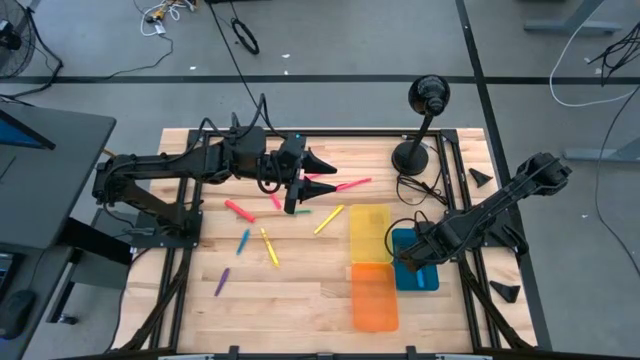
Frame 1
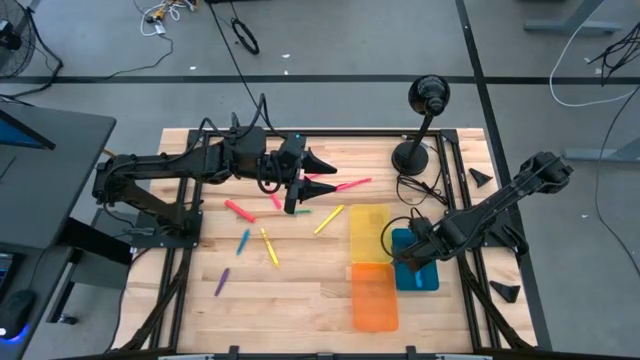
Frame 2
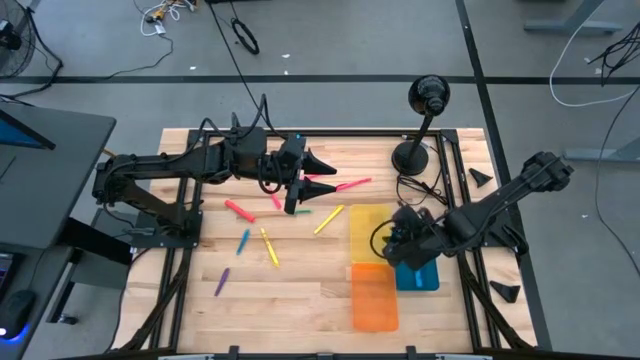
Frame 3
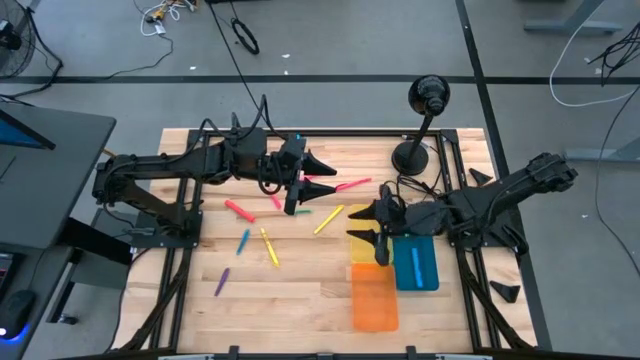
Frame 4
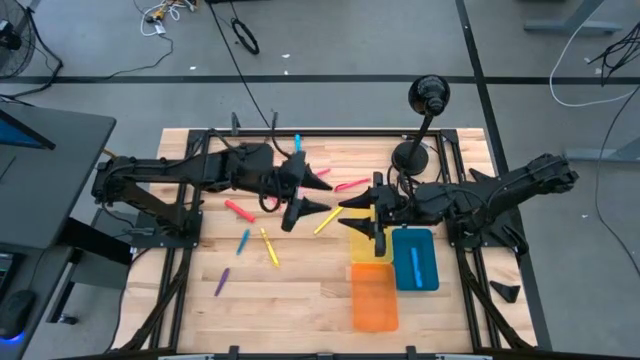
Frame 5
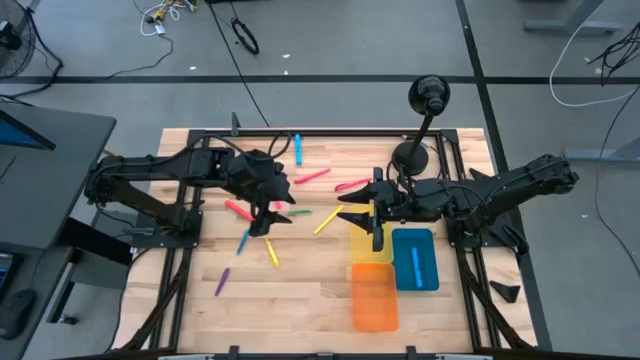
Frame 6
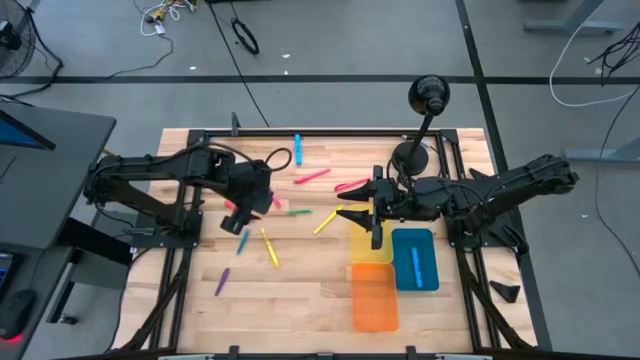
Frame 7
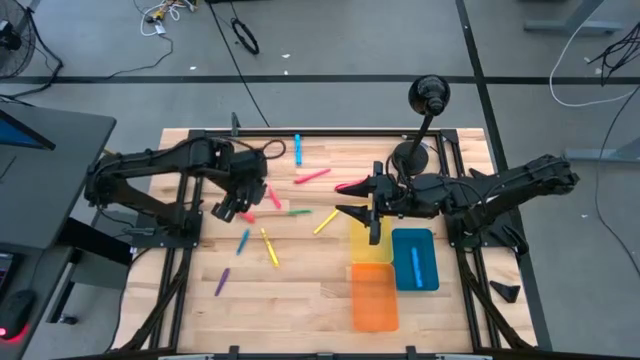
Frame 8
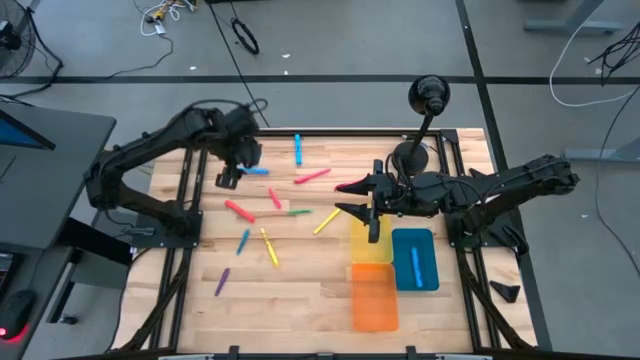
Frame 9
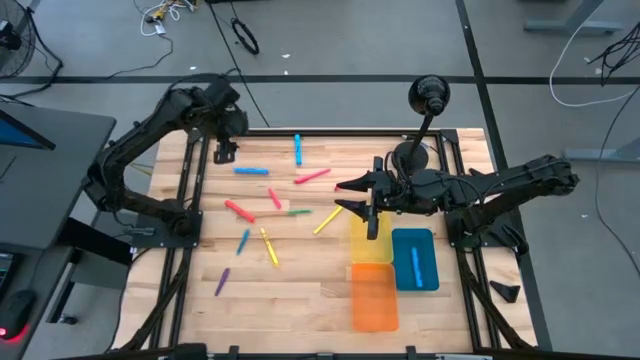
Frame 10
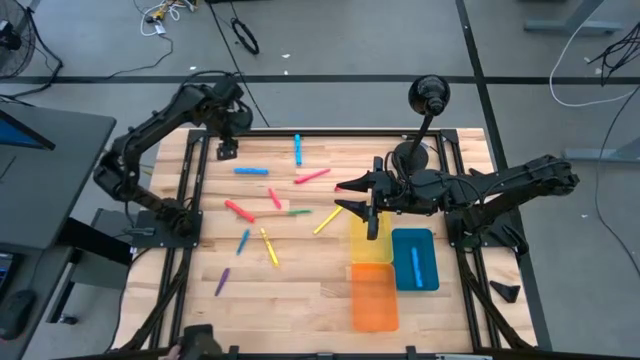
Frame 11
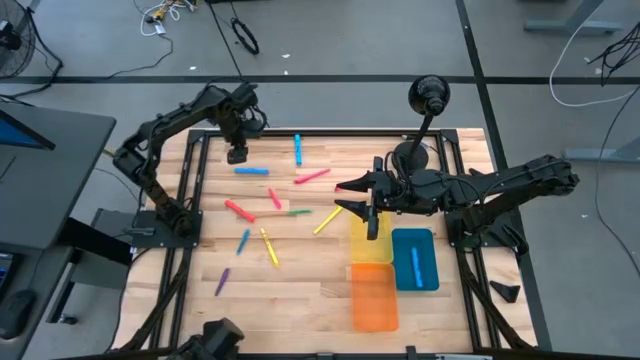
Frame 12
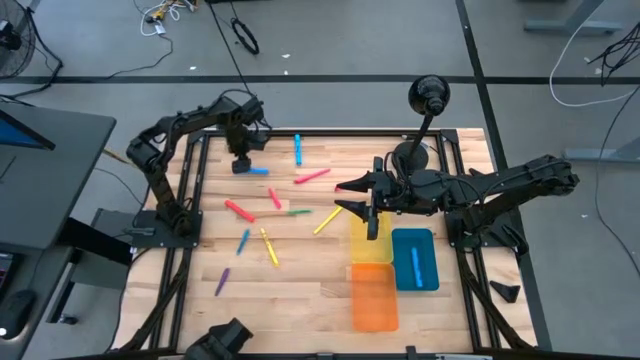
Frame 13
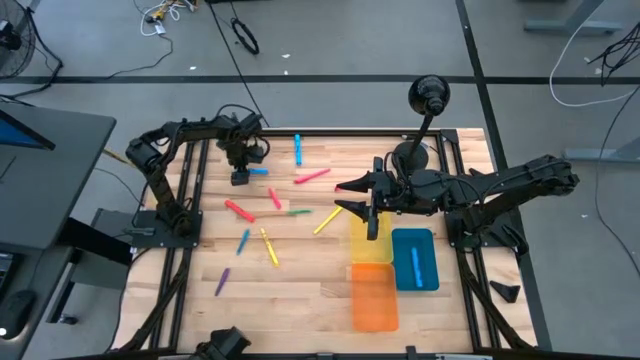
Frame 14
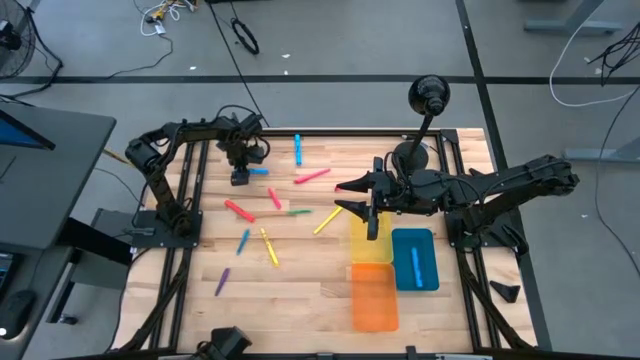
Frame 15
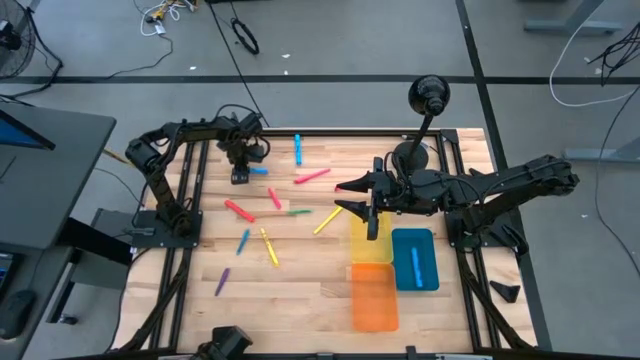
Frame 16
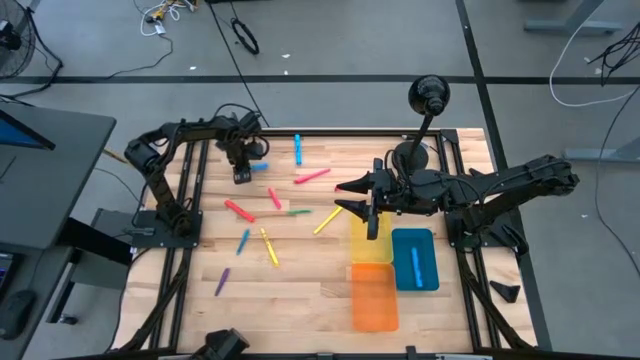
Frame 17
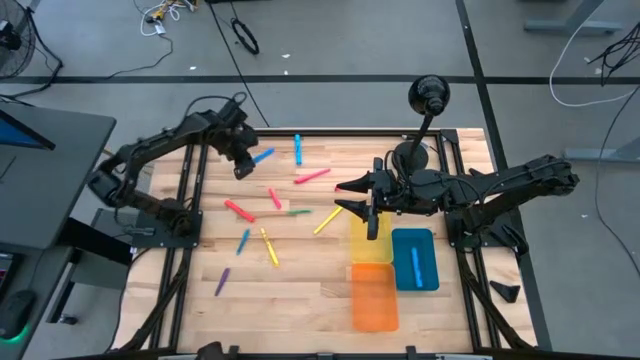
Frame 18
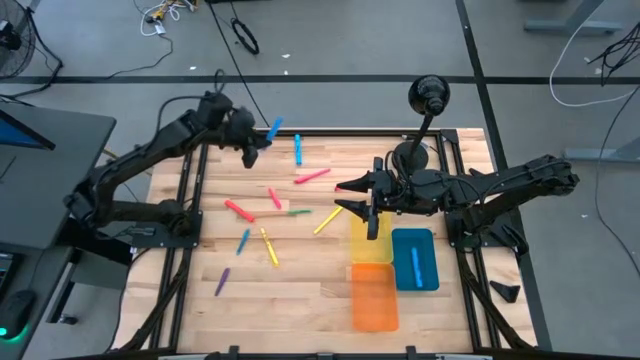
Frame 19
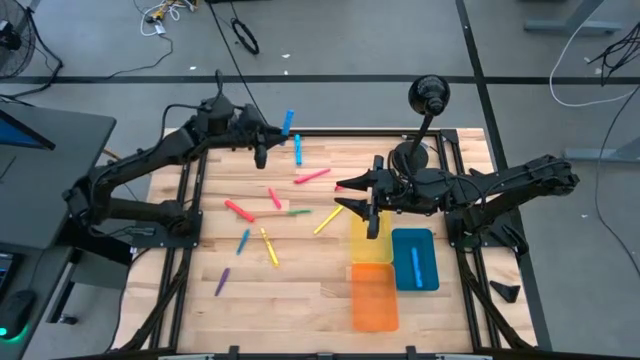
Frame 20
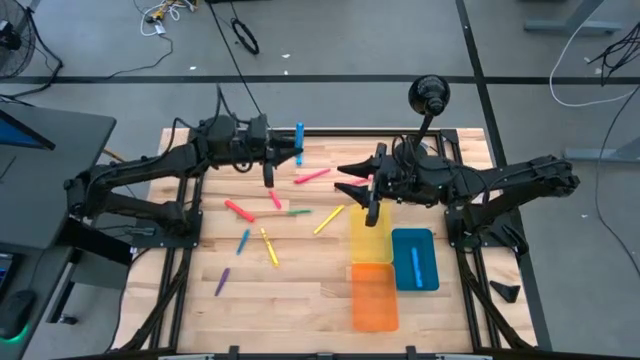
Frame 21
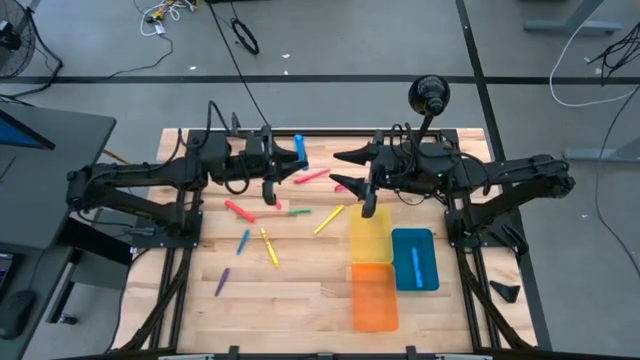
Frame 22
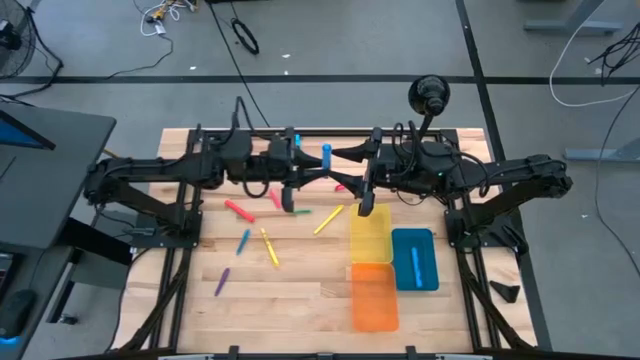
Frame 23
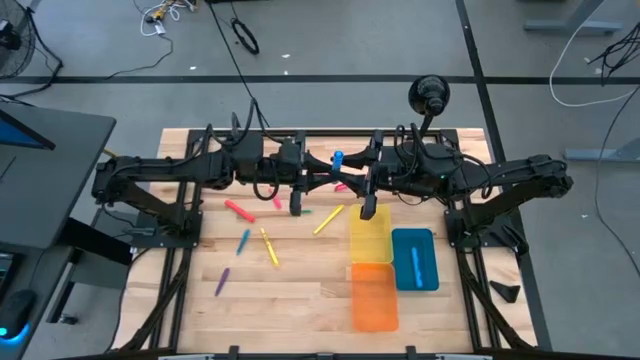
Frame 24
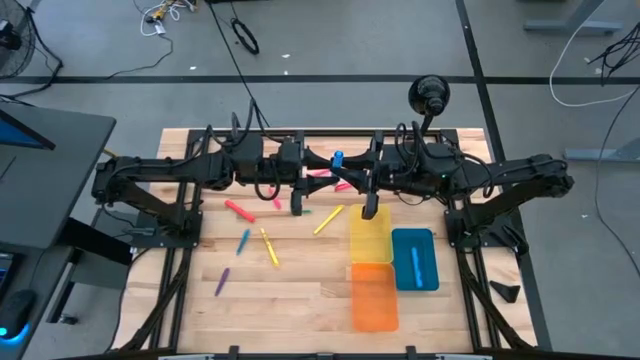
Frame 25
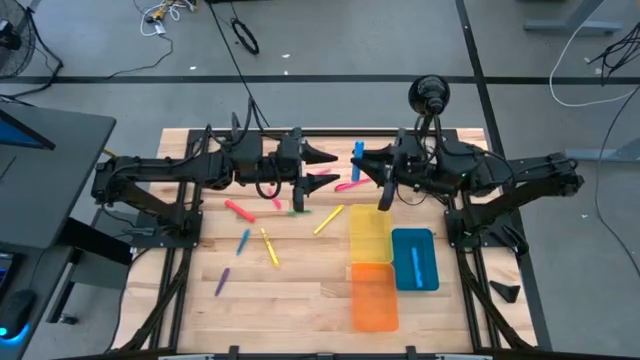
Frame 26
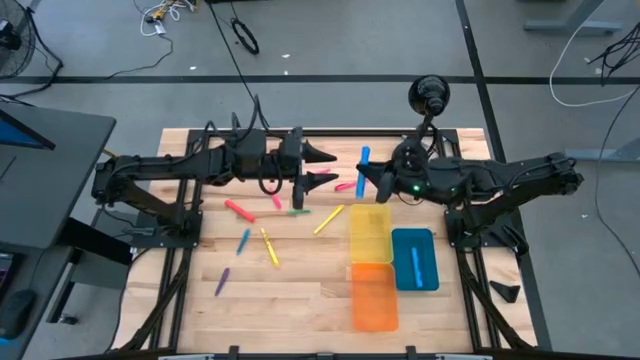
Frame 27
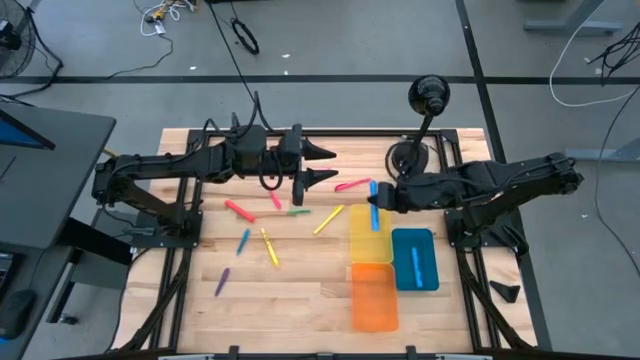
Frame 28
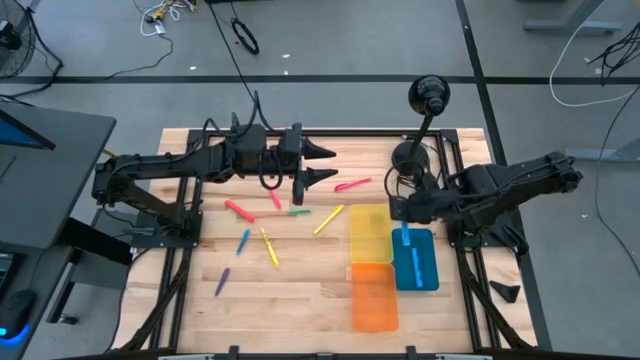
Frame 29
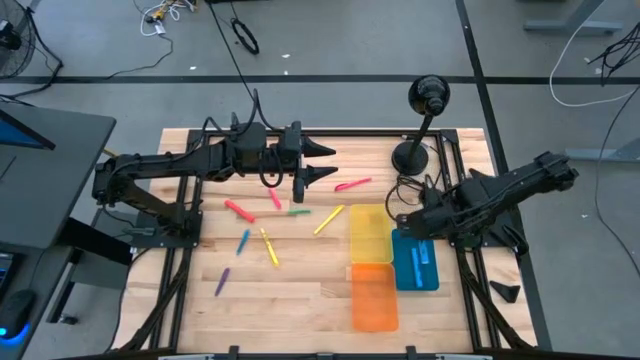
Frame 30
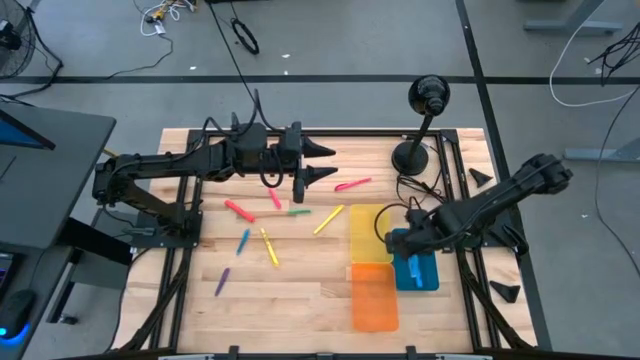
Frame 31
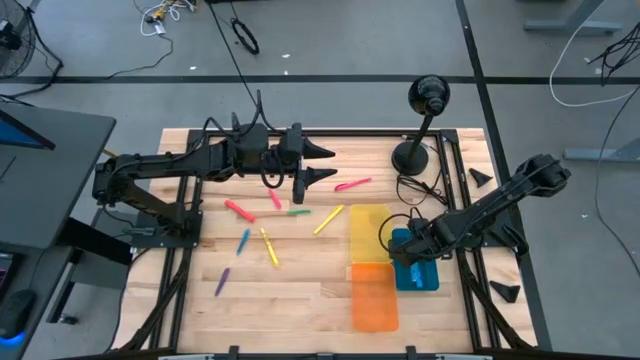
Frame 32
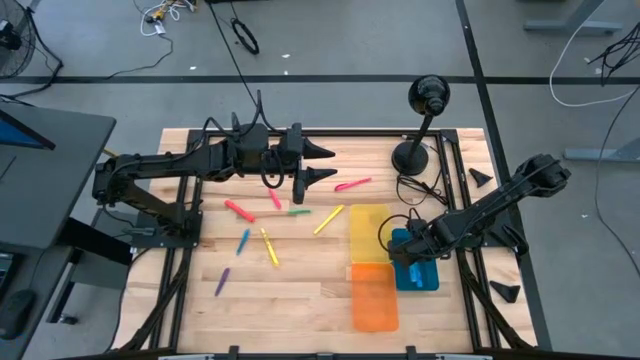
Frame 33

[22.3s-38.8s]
Task: Pick & Place Markers
Put the left blue highlighter into the blue bin

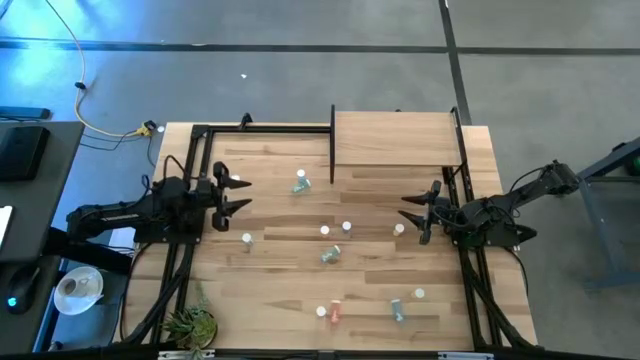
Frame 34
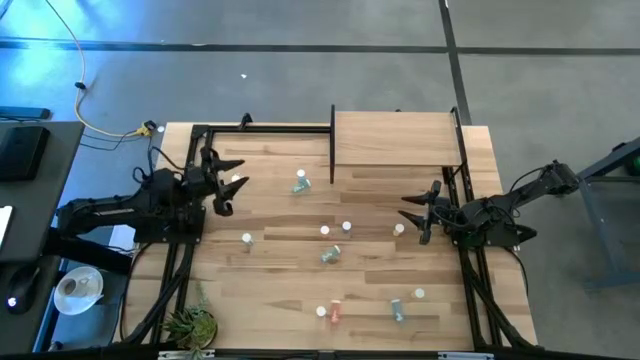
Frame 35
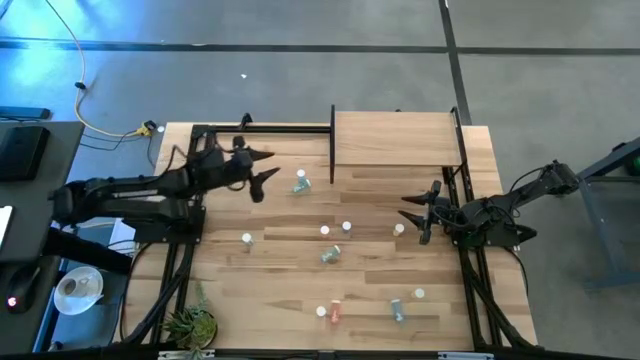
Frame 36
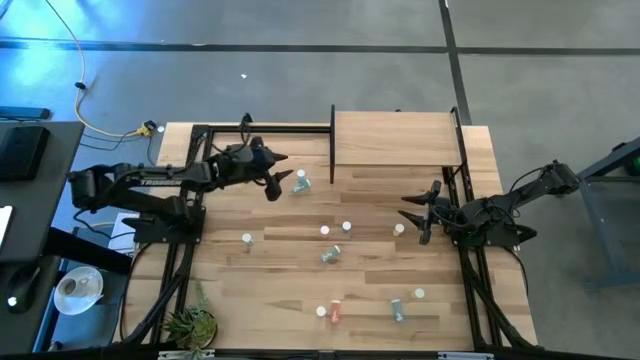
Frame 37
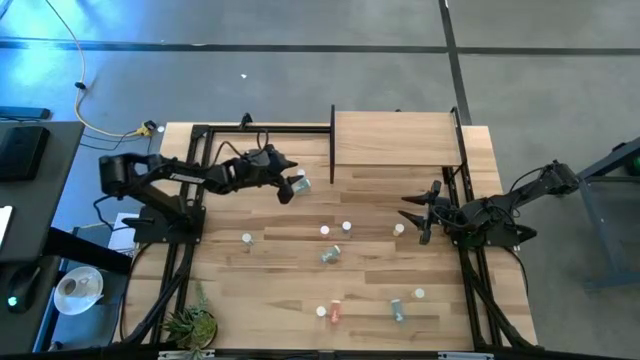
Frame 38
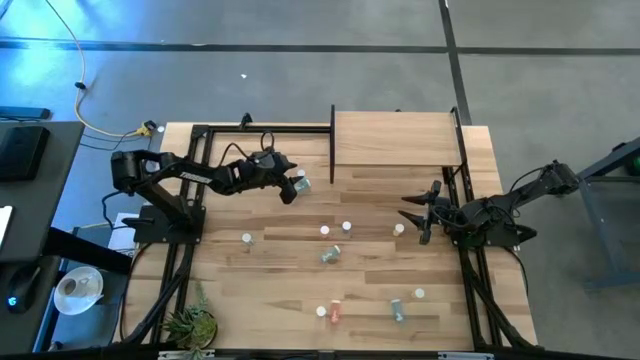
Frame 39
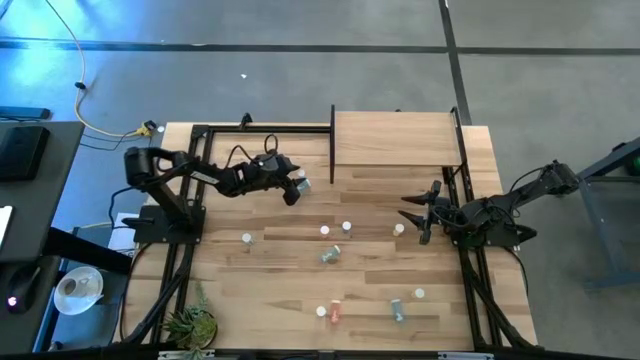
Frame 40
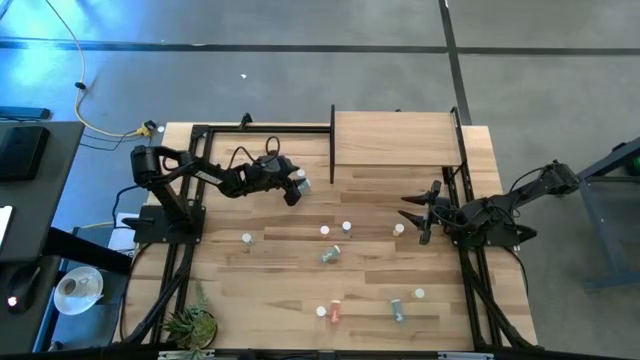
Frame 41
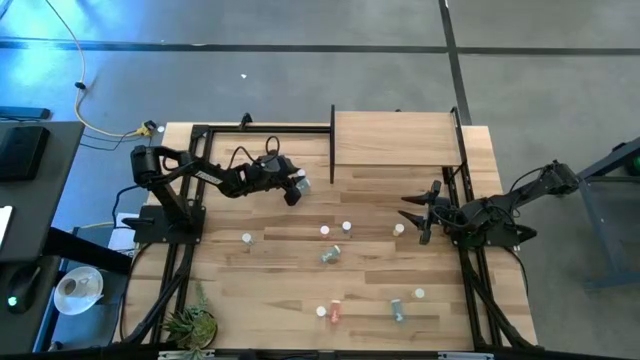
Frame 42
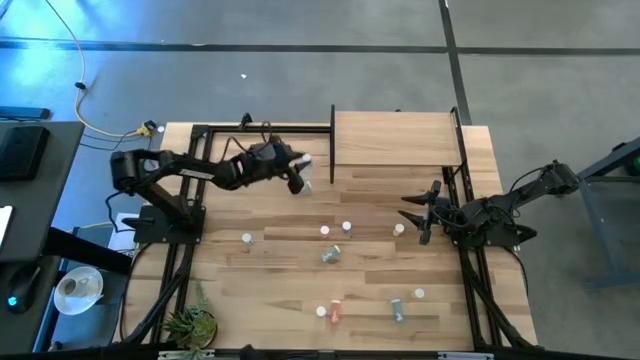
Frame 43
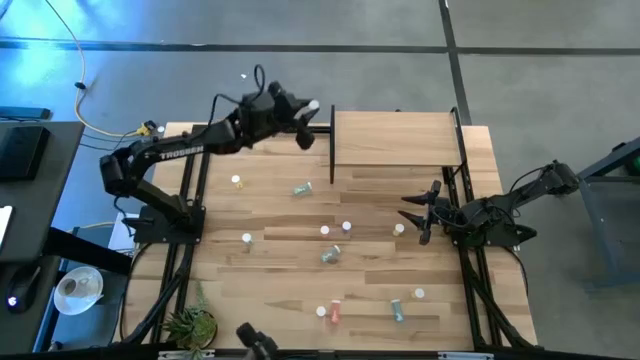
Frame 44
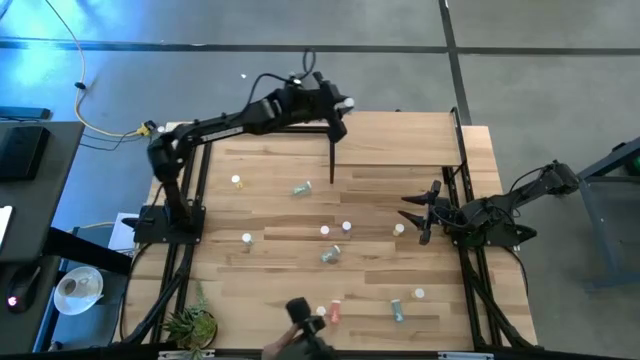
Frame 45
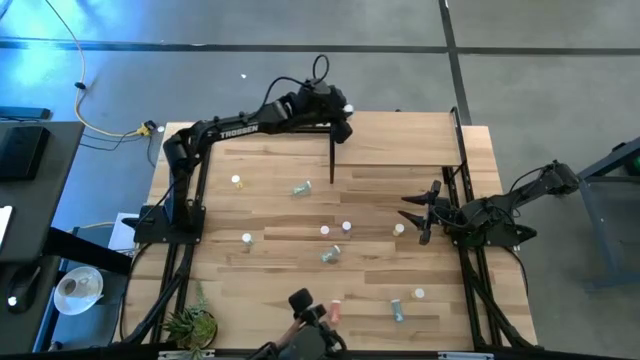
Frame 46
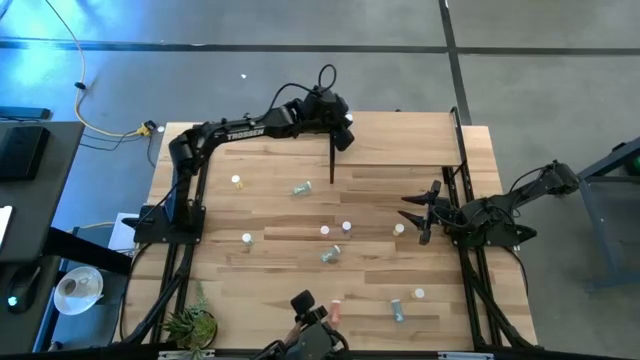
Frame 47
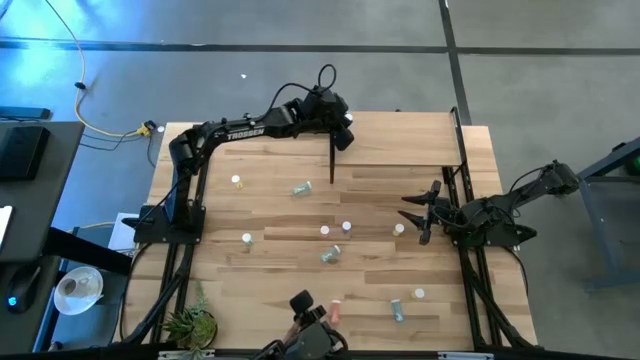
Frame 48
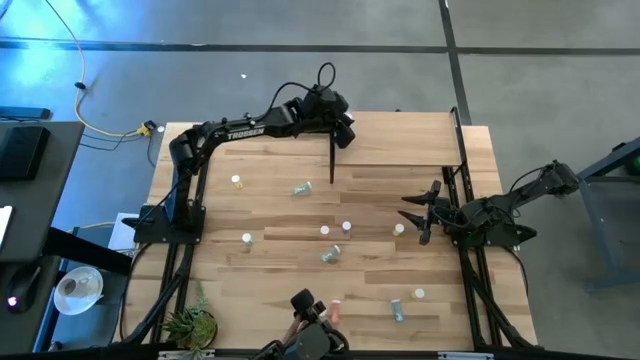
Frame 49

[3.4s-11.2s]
Task: Pick and place medicine bottles onto shelf by color
Put the top blue pill bottle on the shelf
